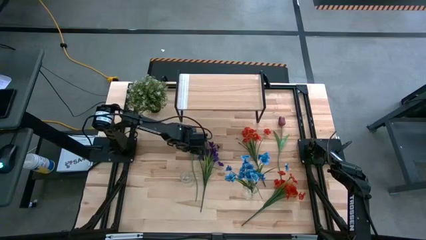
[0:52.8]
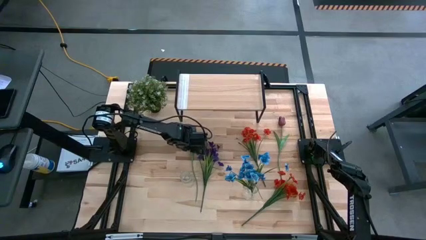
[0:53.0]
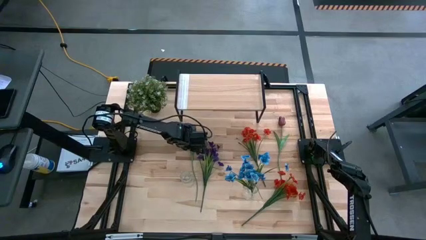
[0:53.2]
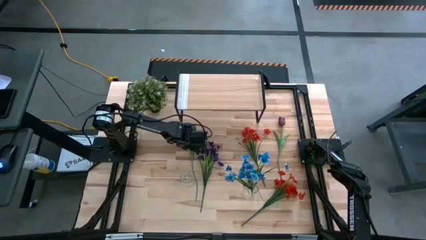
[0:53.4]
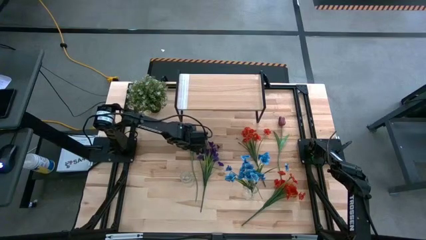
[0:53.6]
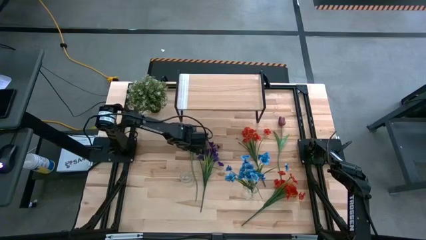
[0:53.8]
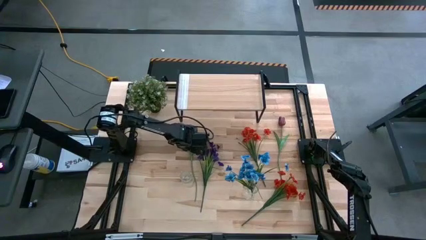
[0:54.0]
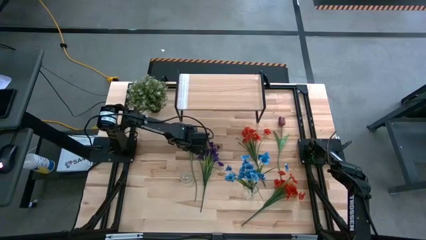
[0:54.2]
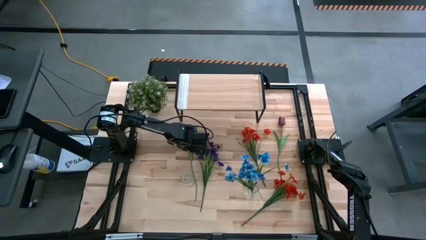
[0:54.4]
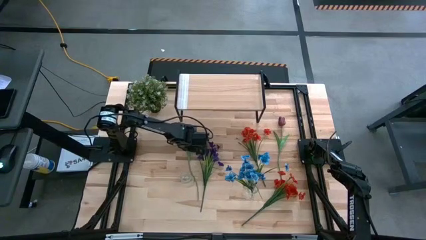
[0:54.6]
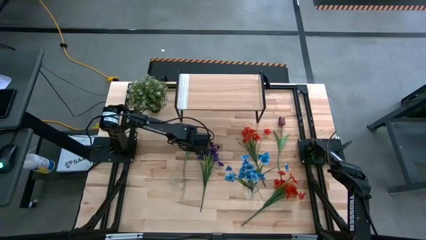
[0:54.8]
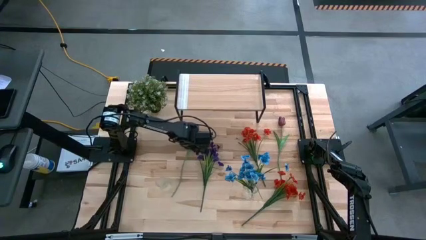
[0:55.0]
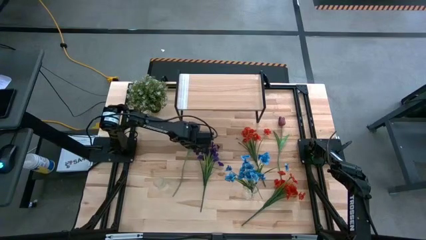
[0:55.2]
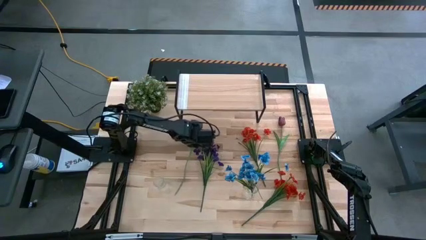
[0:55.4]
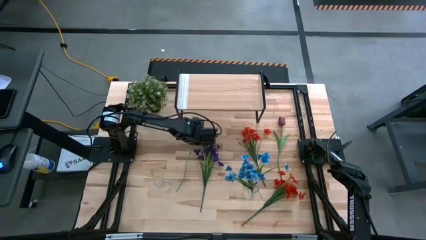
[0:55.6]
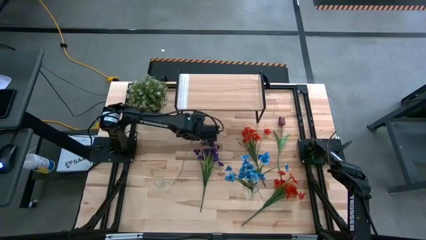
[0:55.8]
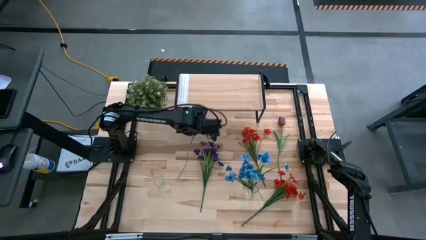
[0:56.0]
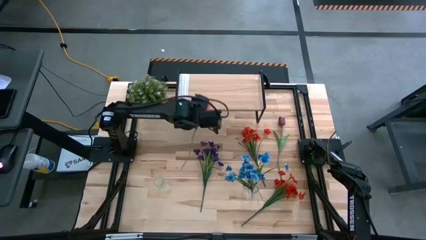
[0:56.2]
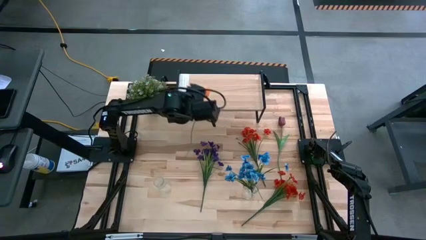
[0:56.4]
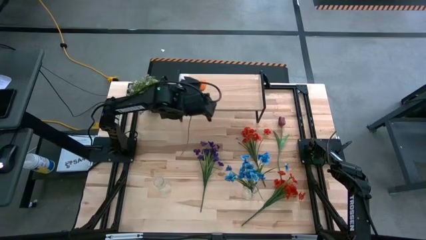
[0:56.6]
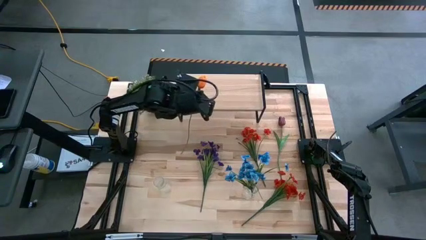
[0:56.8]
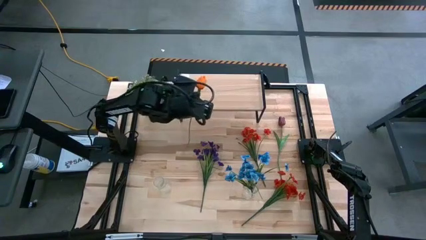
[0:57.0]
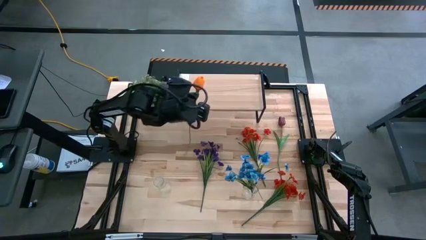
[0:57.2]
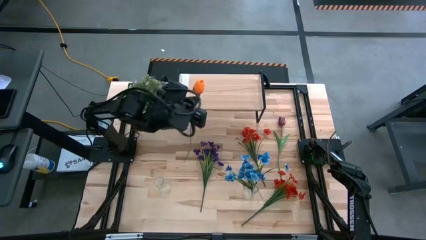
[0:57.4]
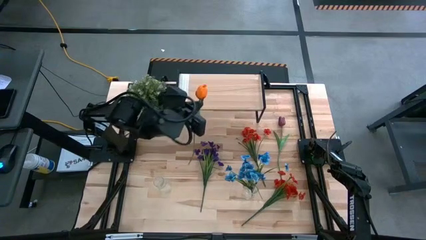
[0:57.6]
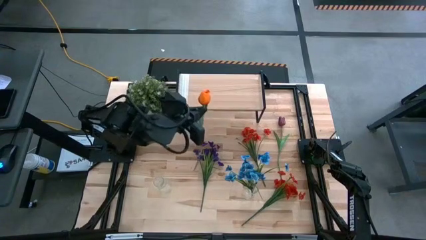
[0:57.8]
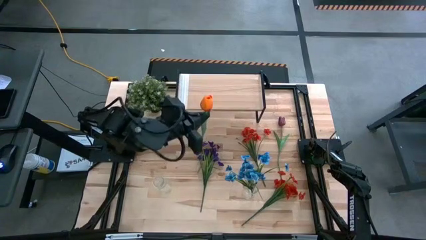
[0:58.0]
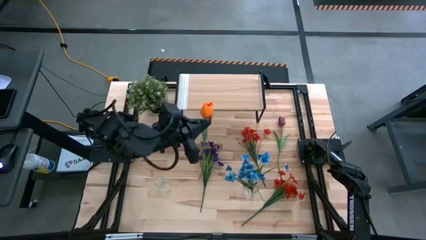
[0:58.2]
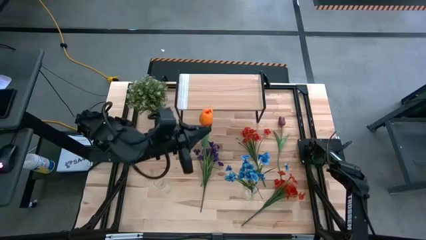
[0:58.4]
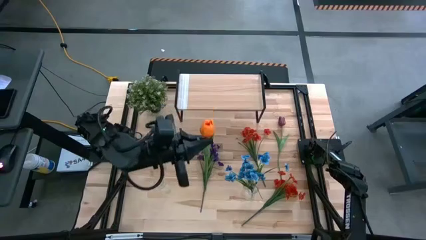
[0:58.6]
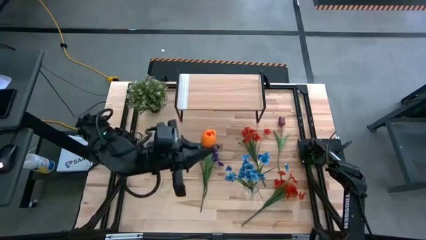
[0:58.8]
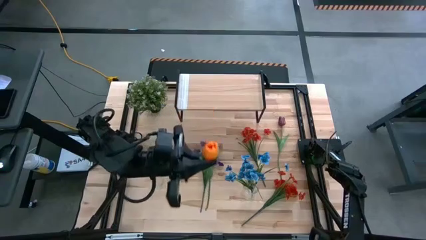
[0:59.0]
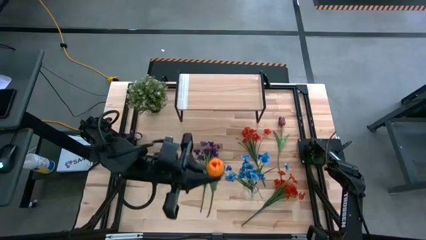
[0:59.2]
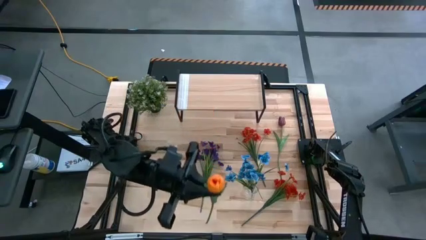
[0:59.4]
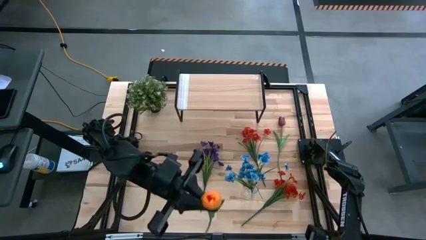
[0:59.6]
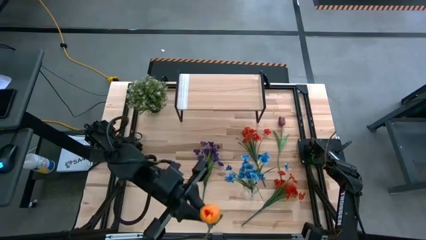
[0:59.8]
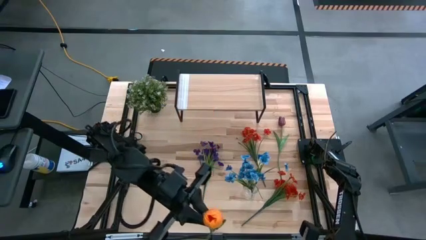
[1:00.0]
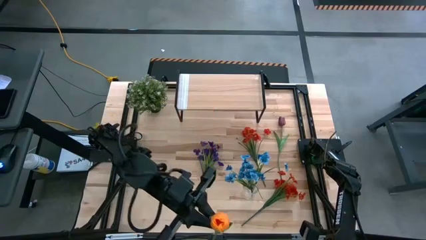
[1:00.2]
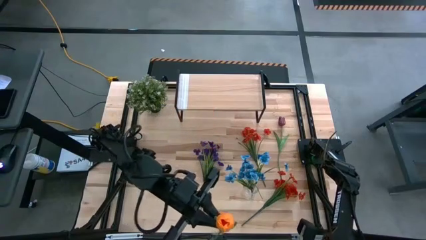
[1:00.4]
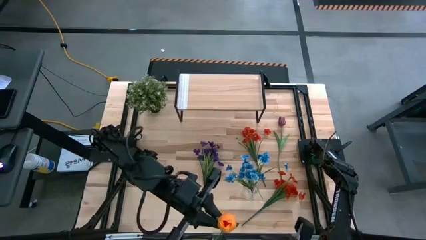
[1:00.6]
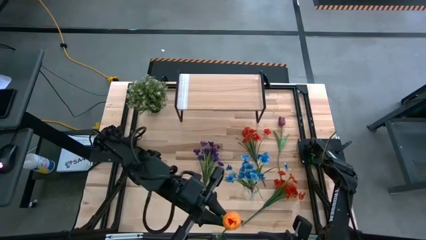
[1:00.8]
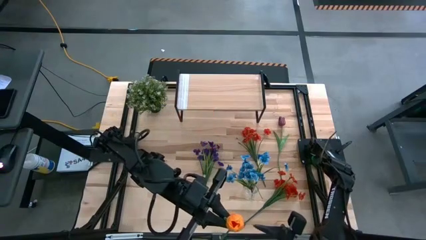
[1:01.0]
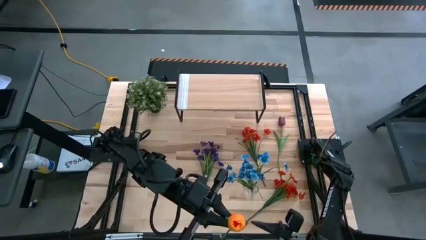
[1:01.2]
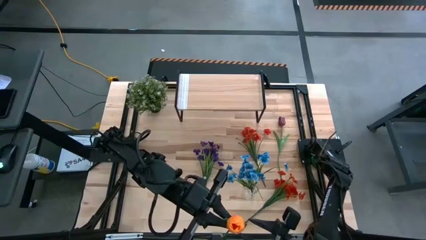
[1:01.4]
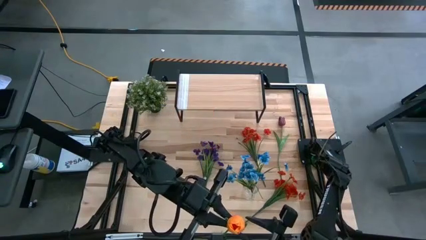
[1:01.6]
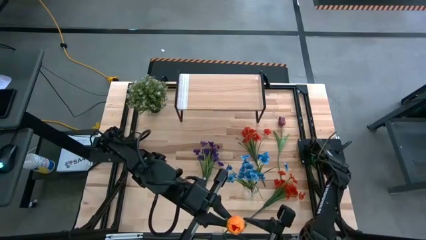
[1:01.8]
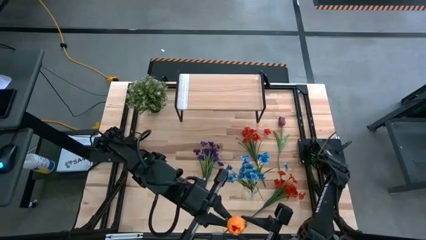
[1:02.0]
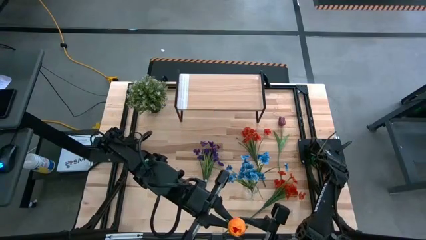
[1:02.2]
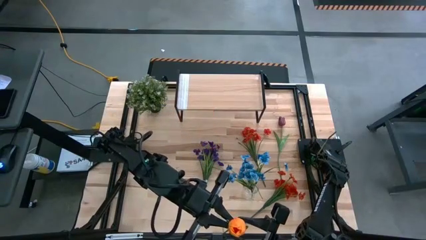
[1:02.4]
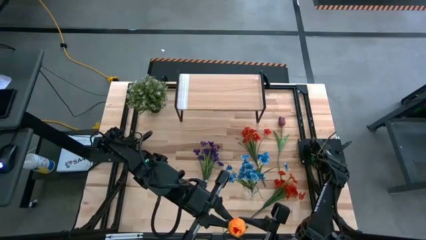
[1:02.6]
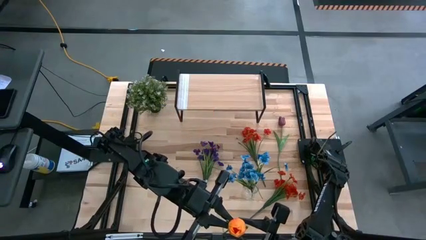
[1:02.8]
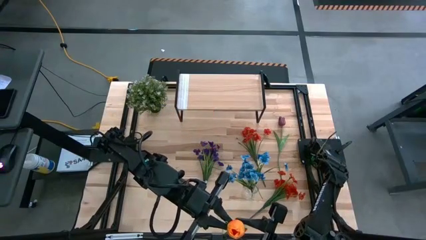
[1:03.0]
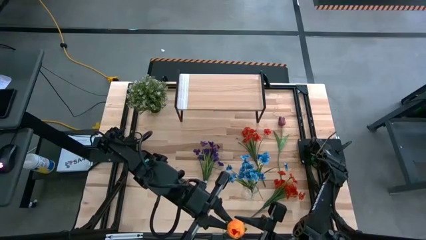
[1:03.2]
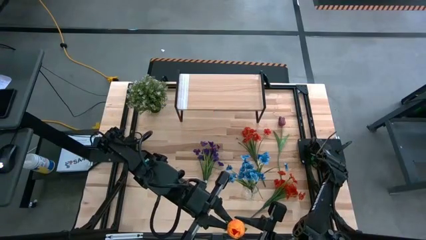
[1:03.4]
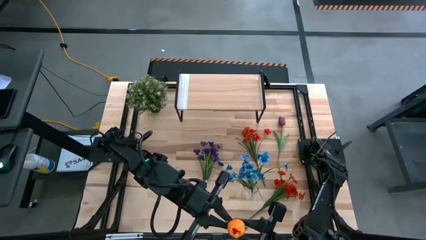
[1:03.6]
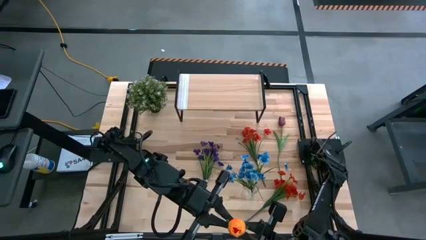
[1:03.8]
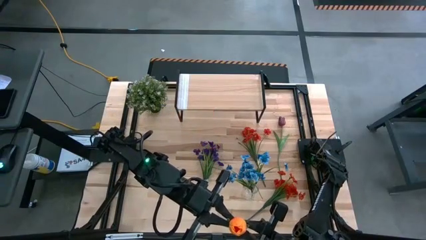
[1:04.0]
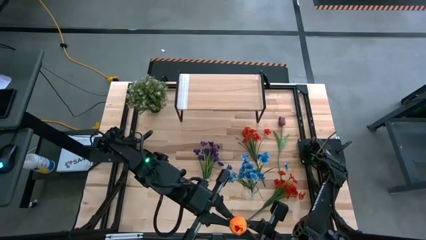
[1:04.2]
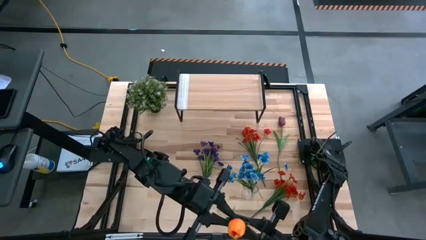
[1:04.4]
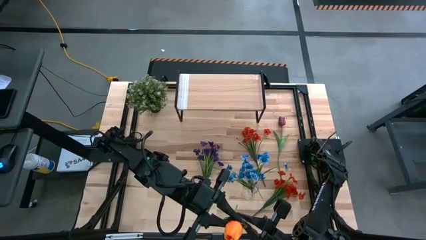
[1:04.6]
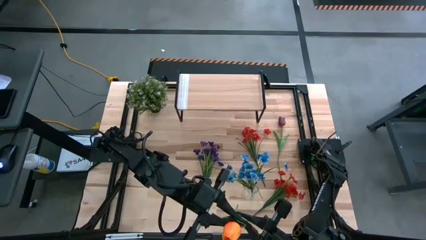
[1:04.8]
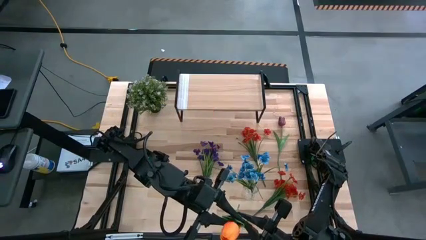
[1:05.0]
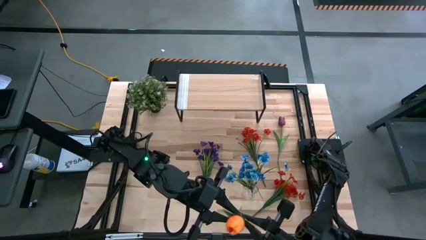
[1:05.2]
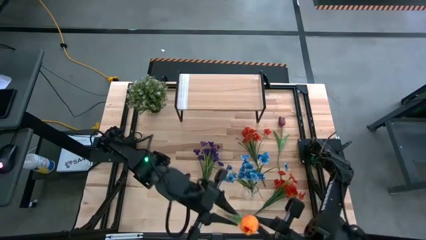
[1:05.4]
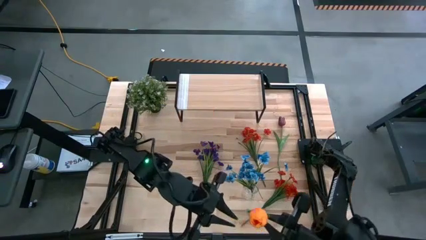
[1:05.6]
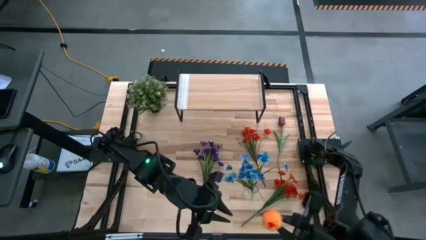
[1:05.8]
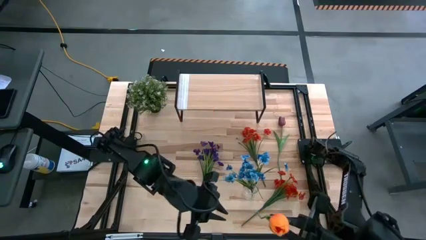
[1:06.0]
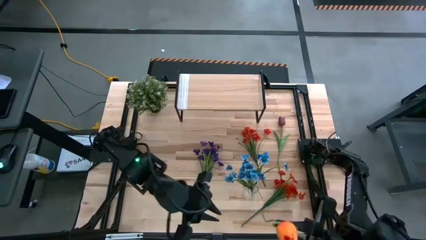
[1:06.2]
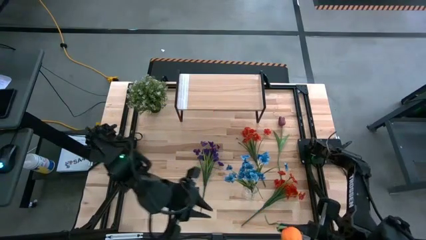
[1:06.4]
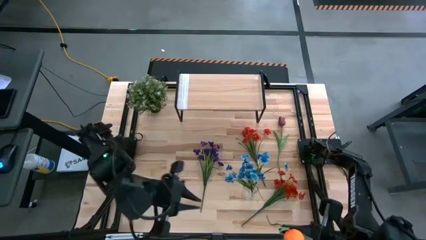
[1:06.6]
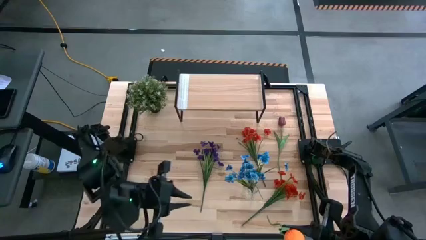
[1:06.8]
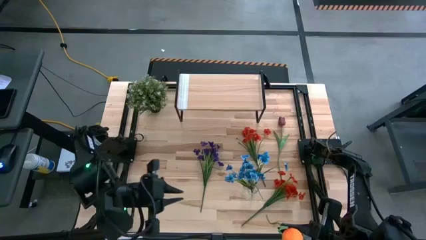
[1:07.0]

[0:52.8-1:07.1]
Task: Pick and place flowers into a vace then onto a shelf
Put the light orange flower into the right transparent vase
